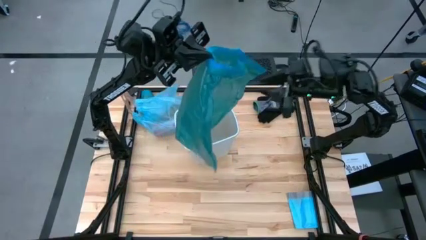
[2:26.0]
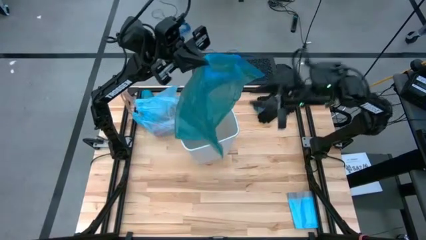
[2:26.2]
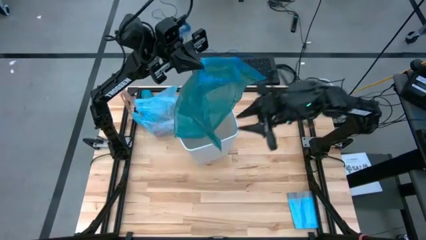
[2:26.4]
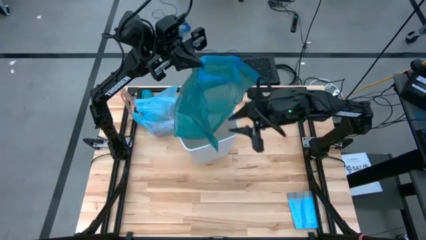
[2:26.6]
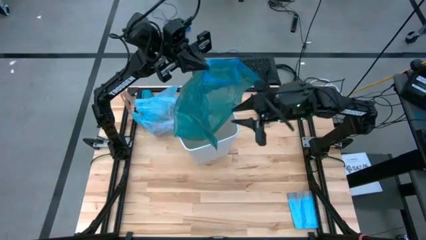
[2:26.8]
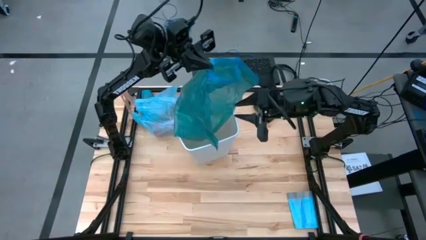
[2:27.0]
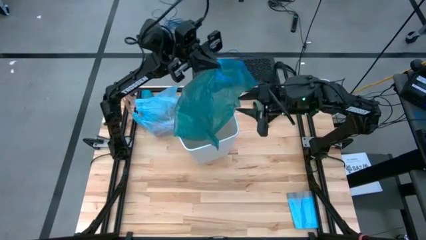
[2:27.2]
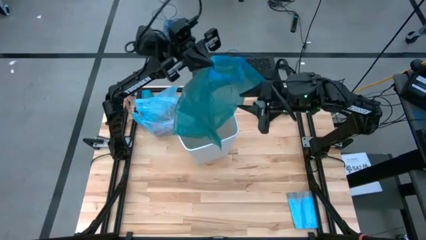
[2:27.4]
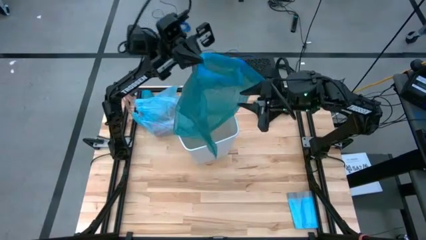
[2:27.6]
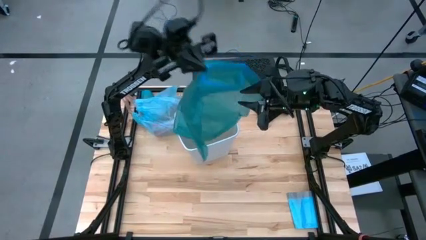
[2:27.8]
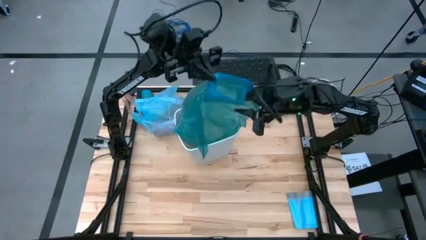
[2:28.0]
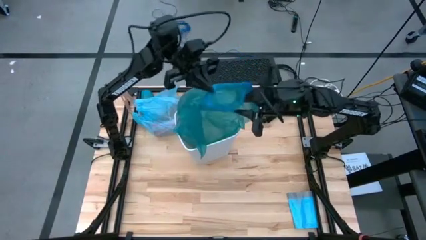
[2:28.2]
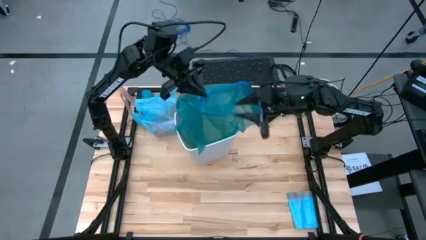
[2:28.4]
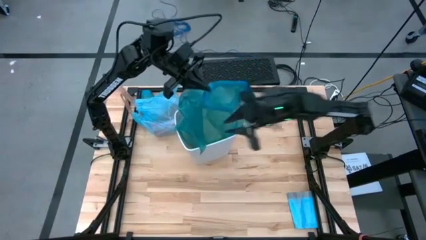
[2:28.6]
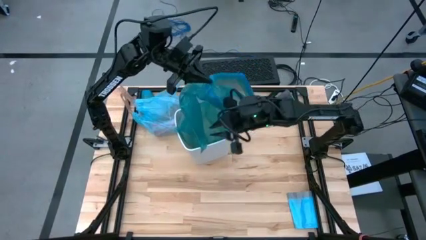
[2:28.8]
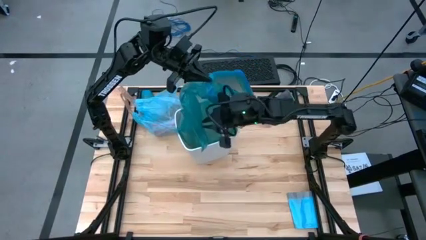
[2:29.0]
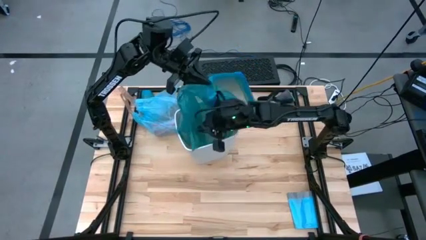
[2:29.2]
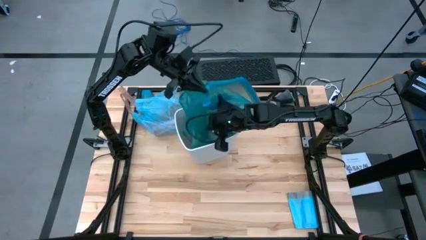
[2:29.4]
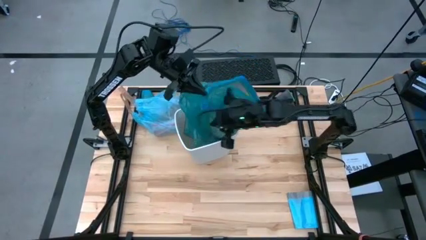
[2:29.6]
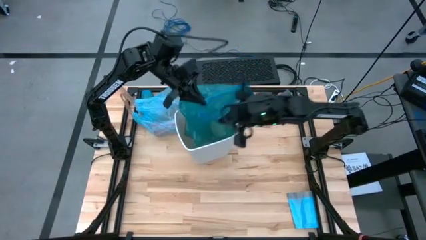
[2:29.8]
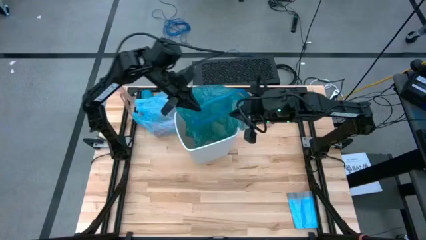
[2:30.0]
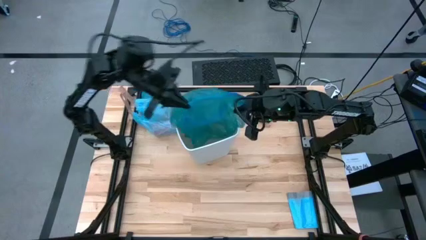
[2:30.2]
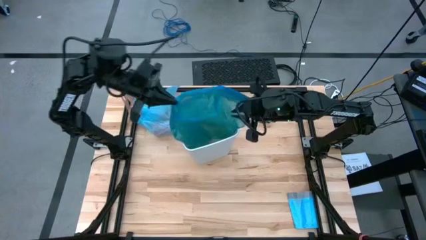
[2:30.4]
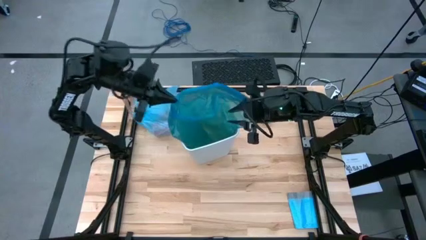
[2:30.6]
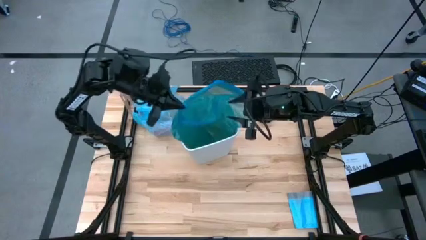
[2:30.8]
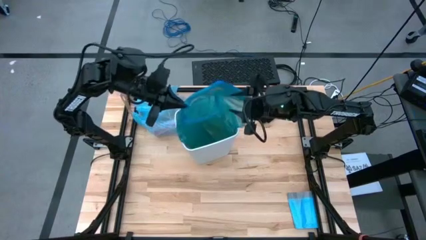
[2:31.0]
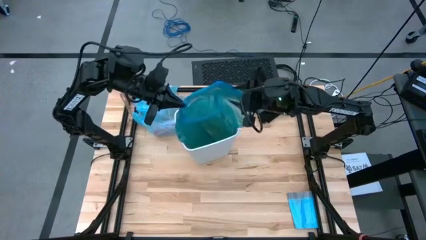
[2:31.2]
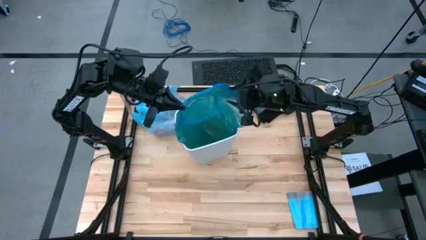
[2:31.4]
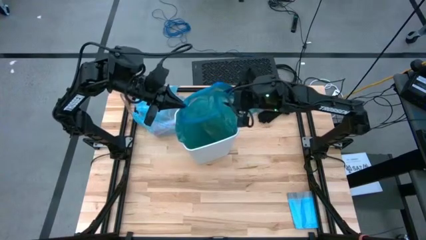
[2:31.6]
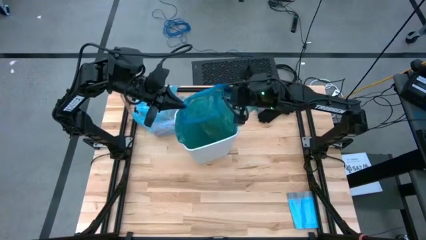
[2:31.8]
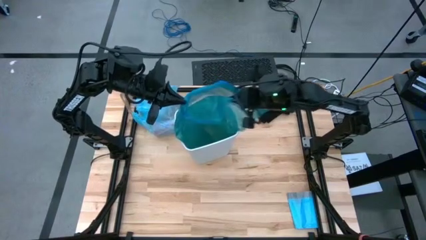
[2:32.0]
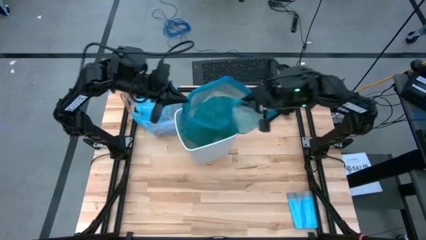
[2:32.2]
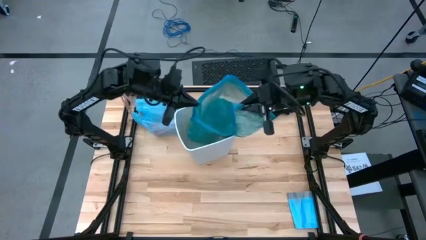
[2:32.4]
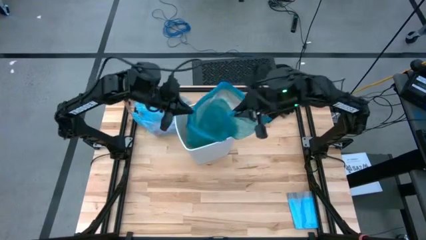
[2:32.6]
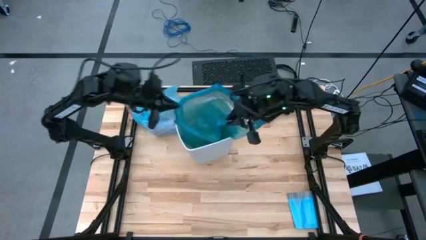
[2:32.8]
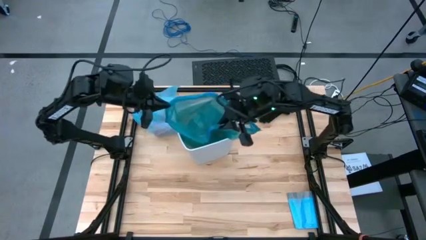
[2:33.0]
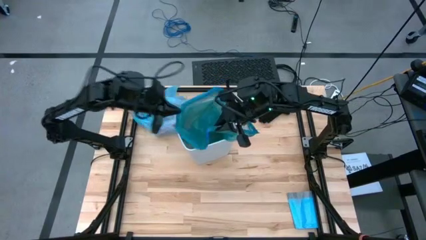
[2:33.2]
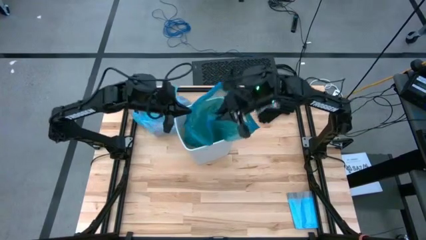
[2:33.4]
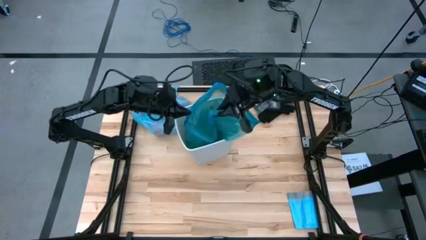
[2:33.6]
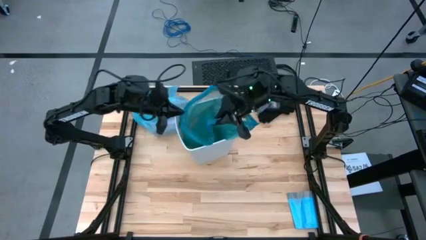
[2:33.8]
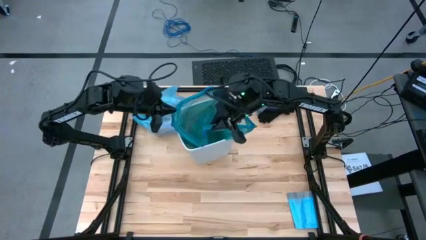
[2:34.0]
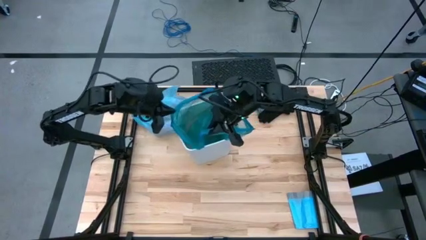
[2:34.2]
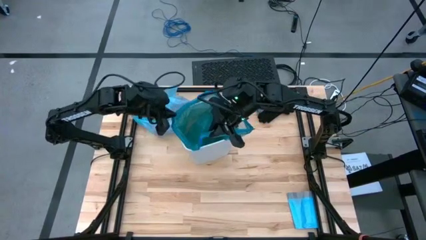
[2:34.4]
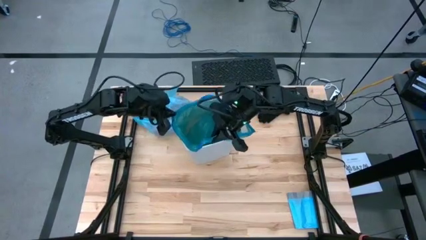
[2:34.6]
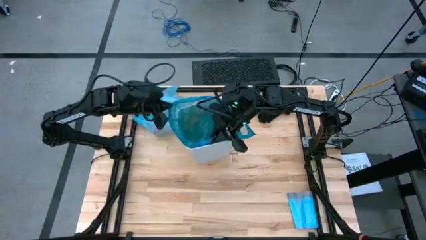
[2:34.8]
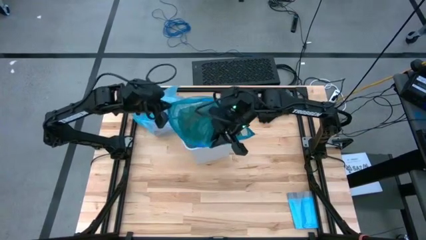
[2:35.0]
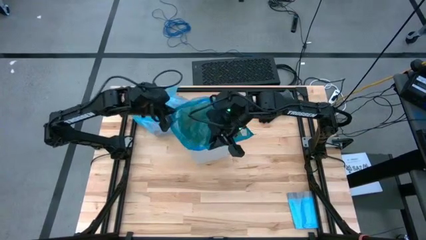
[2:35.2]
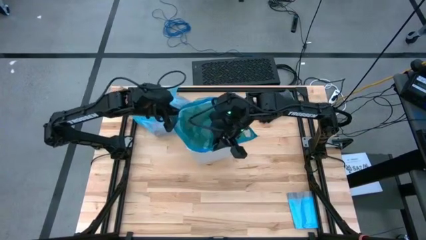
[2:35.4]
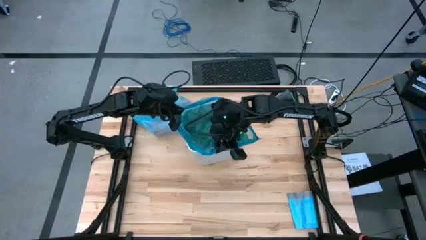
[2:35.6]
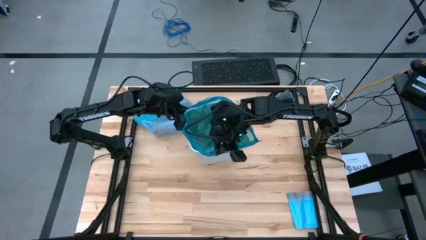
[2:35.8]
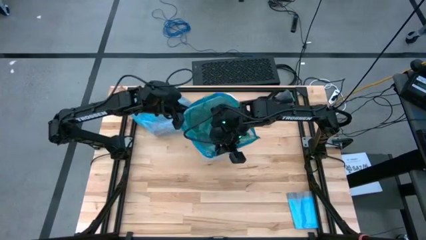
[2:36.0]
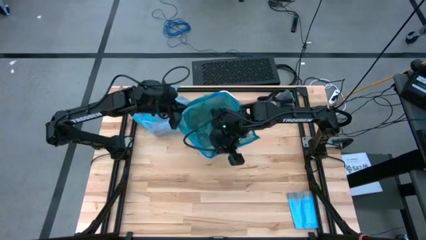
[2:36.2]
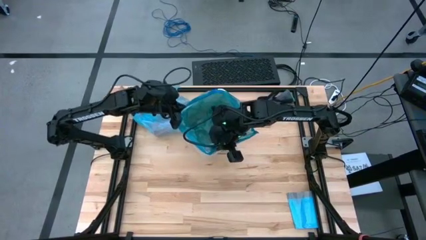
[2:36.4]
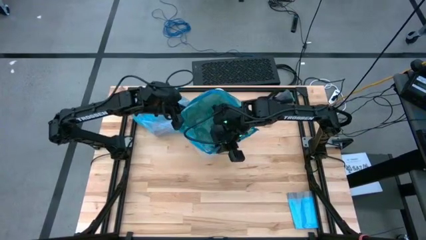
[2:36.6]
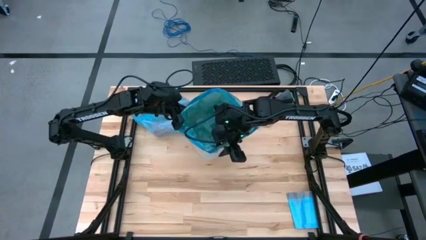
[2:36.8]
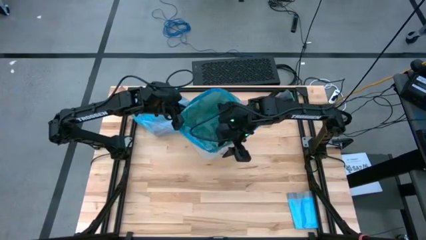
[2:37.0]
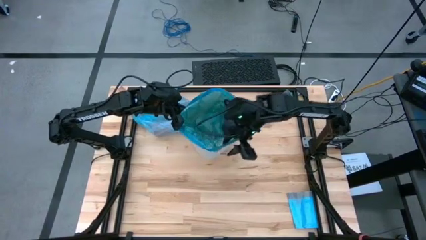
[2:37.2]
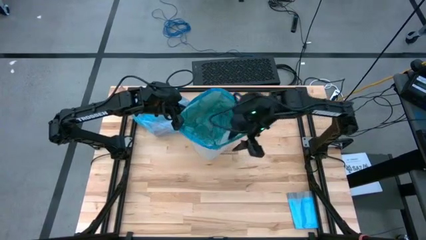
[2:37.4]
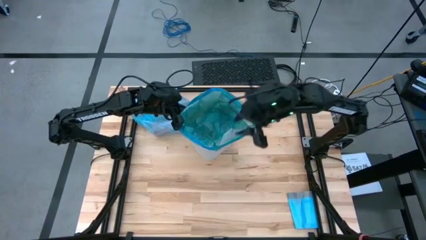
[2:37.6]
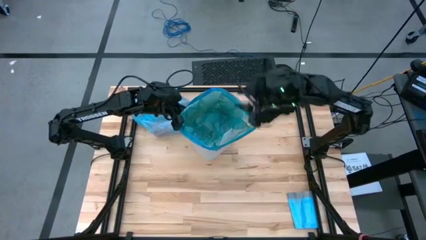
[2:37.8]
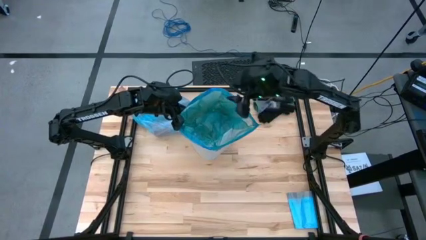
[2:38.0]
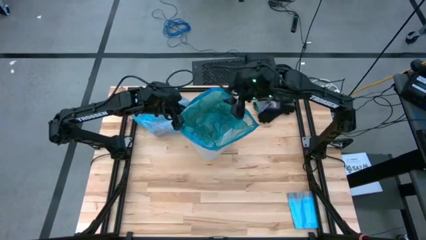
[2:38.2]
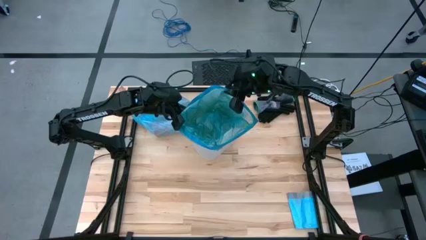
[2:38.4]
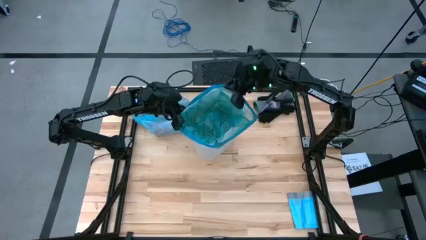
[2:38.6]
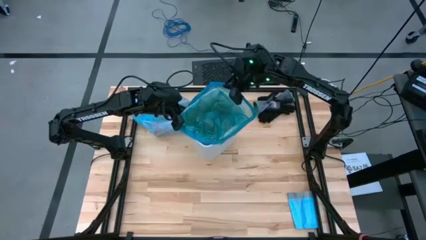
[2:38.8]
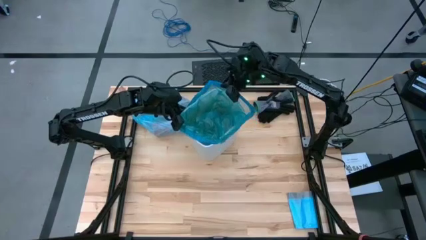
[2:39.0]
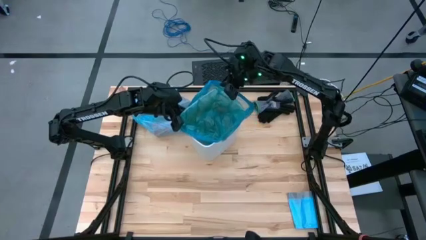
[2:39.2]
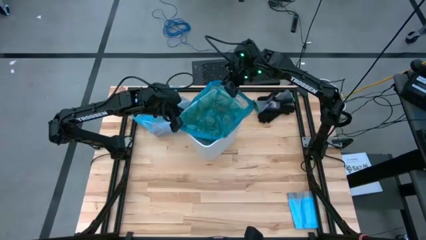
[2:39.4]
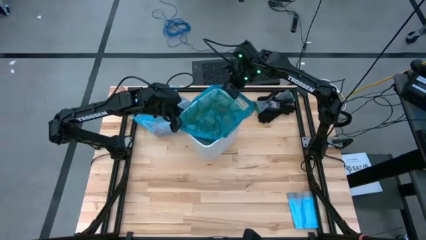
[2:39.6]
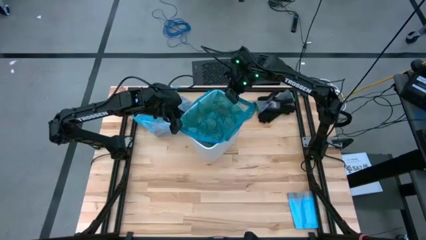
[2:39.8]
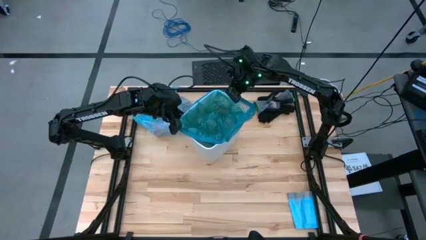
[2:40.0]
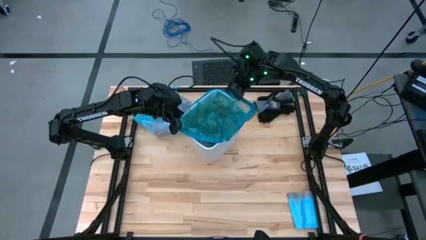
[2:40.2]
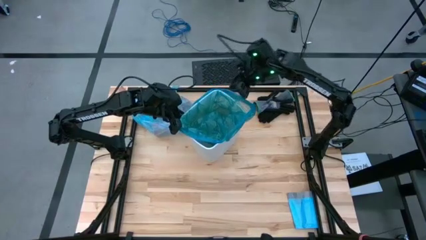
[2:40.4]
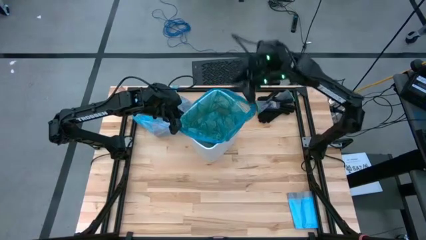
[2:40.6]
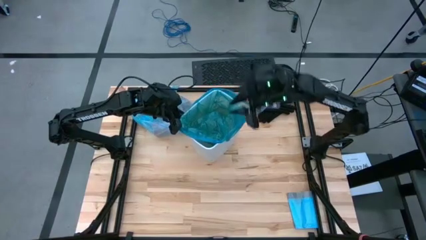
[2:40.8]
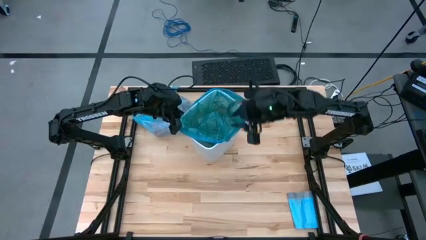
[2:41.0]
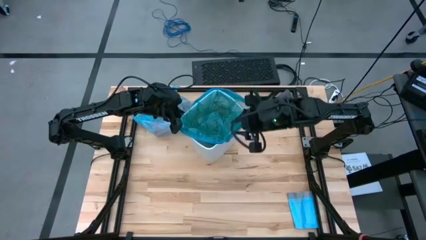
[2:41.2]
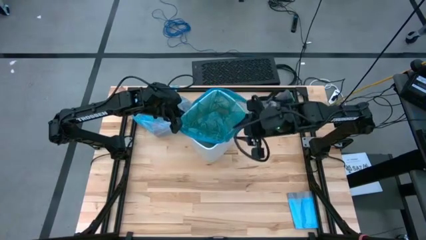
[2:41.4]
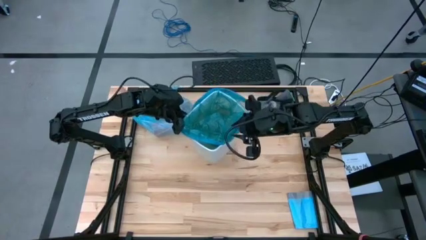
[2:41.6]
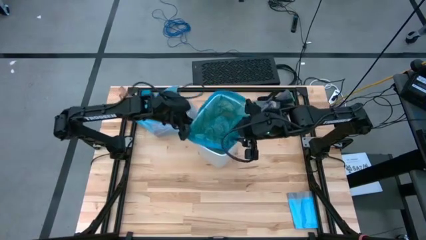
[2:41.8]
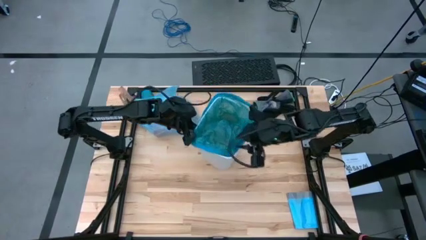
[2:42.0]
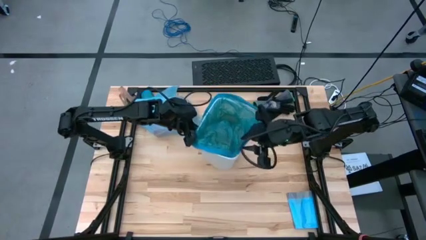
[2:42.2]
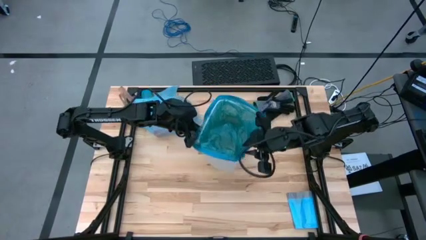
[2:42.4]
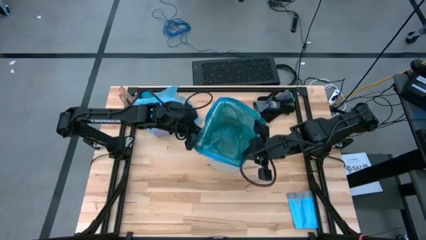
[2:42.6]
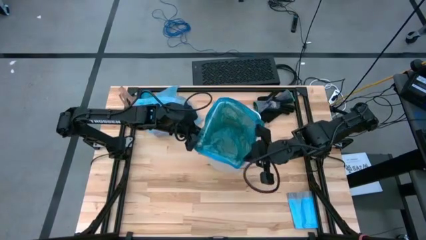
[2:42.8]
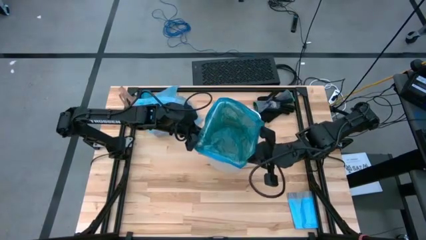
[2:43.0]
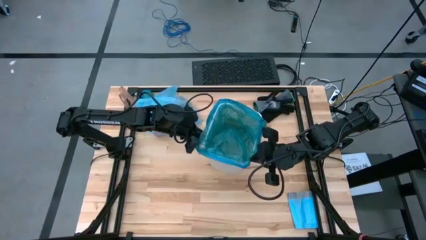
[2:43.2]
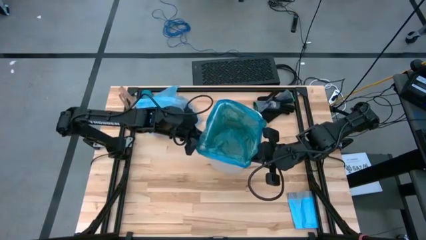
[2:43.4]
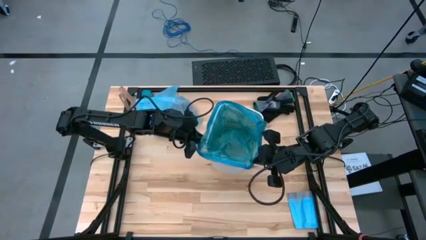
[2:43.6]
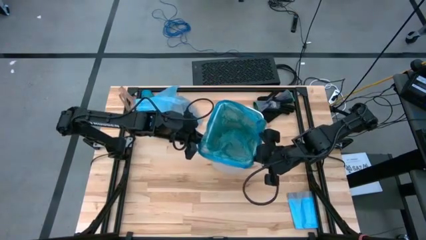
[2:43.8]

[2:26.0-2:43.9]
Task: place trash/remove bag and relplace
Insert the blue trash bag into the white trash bin
